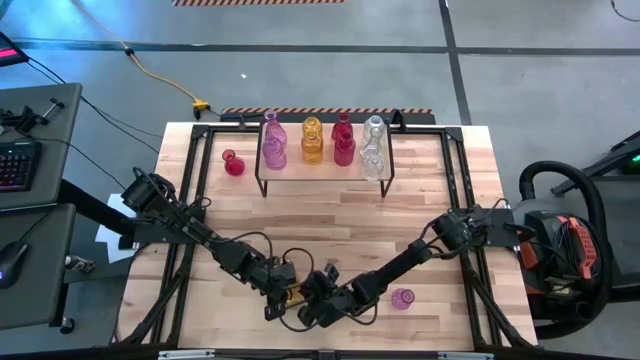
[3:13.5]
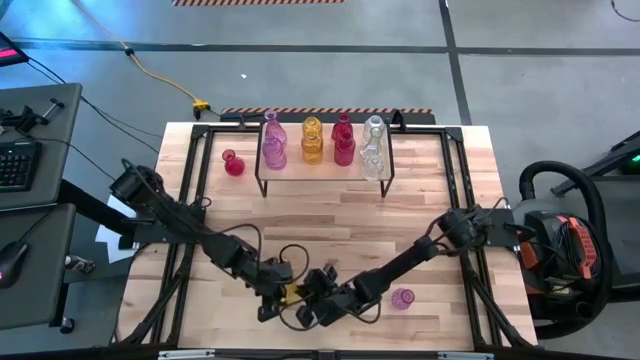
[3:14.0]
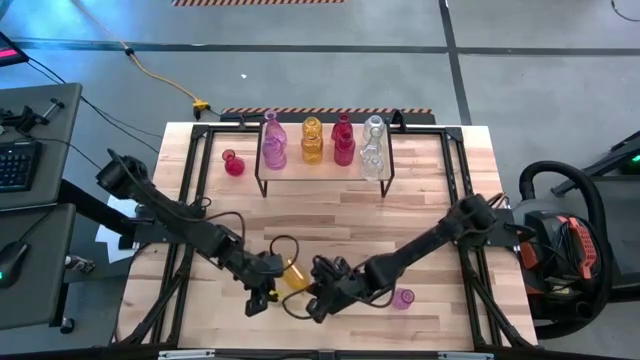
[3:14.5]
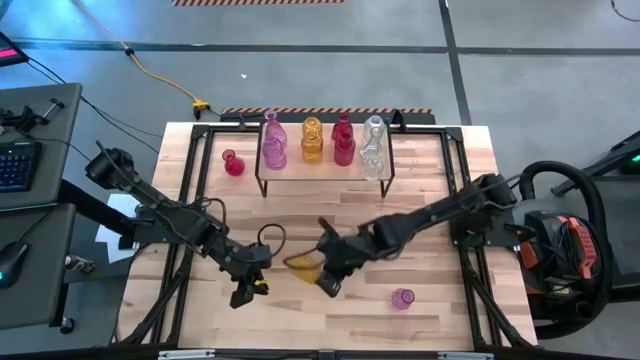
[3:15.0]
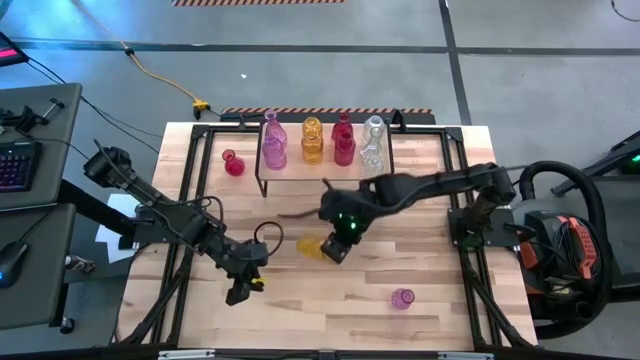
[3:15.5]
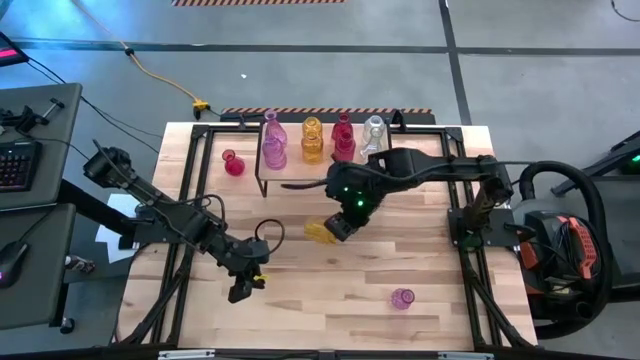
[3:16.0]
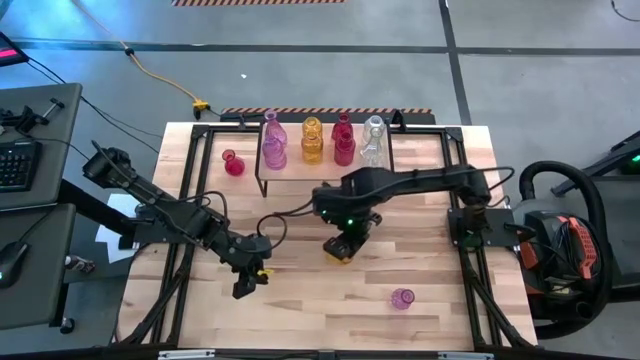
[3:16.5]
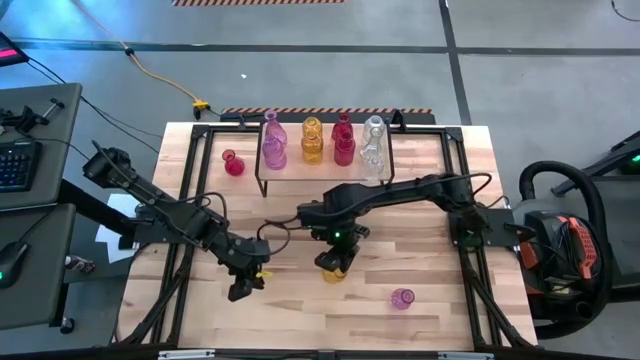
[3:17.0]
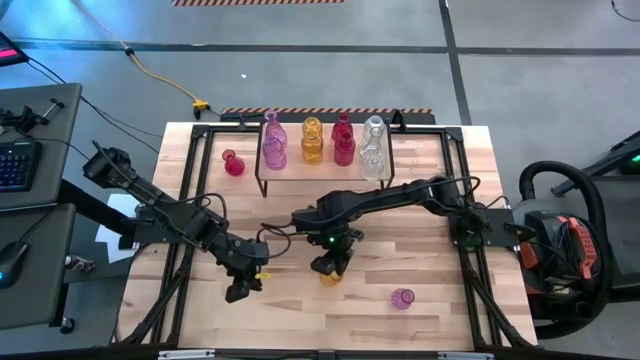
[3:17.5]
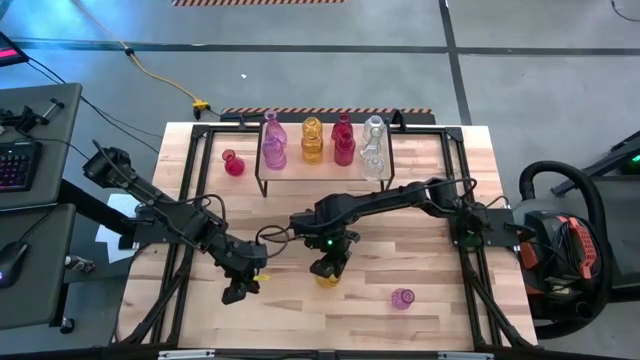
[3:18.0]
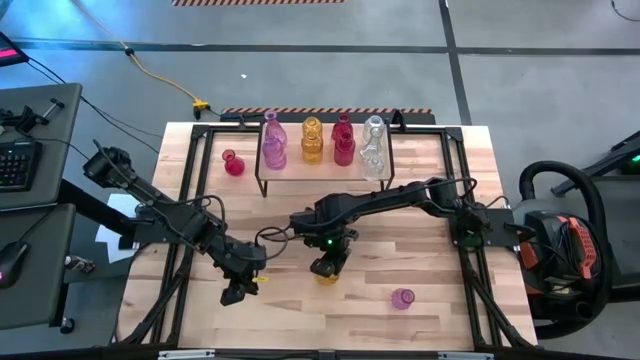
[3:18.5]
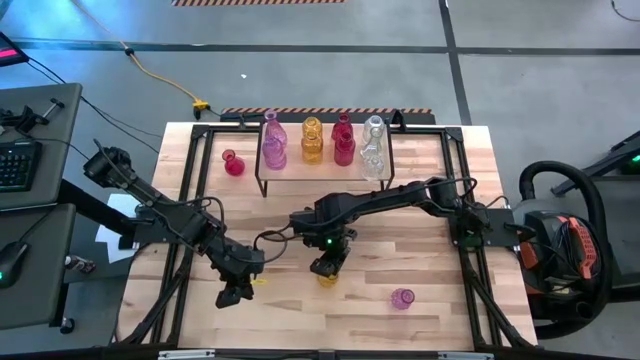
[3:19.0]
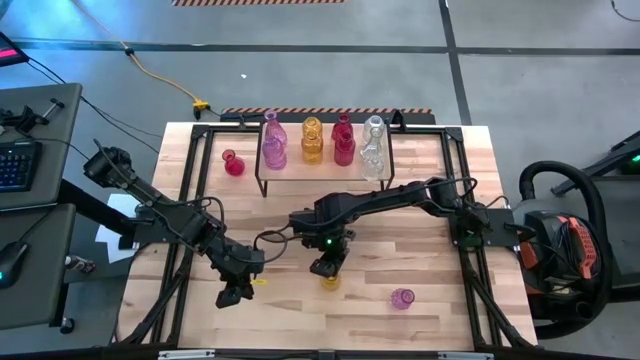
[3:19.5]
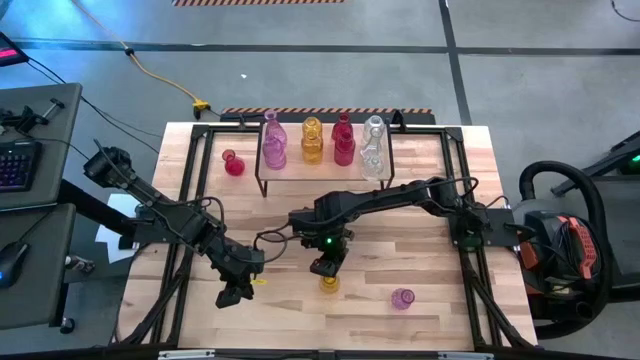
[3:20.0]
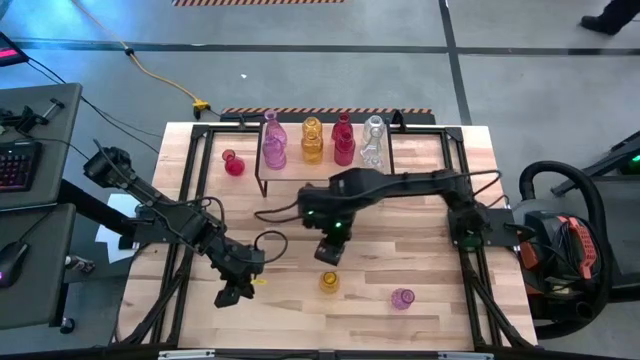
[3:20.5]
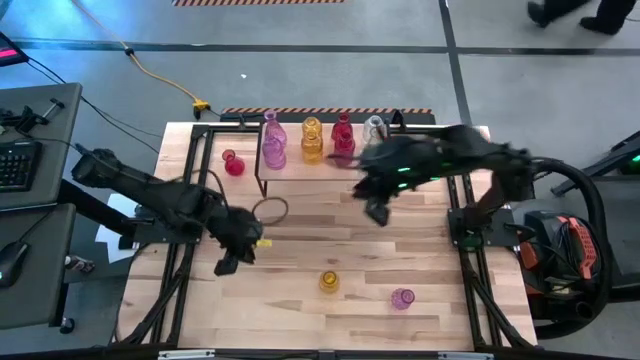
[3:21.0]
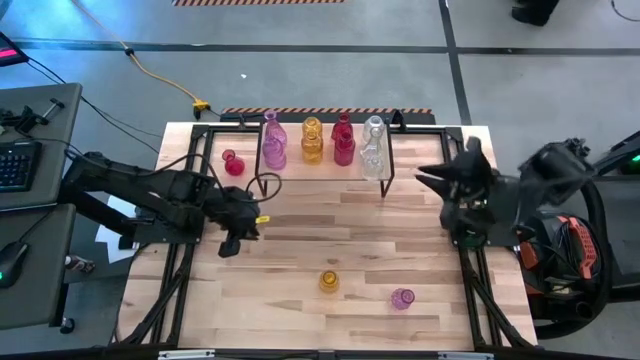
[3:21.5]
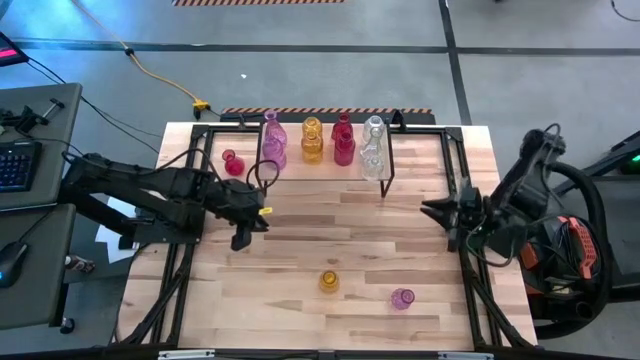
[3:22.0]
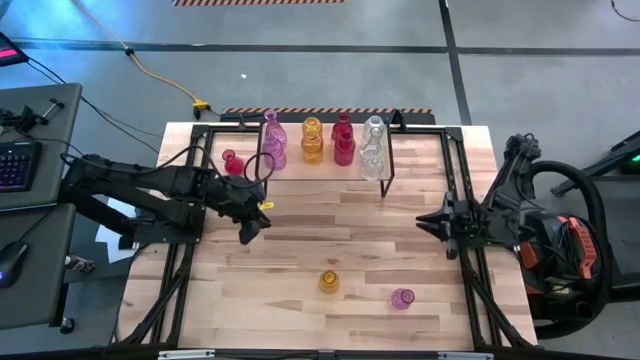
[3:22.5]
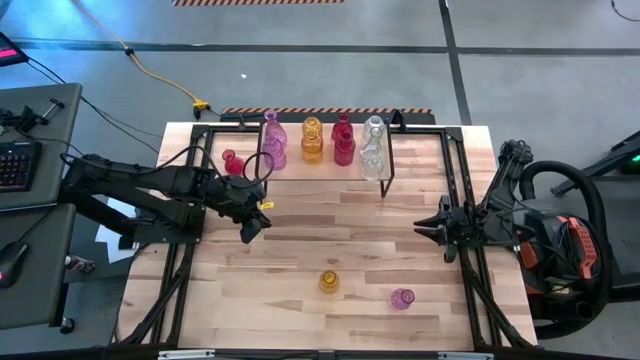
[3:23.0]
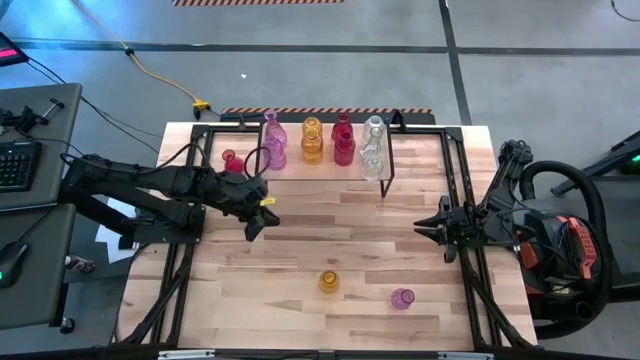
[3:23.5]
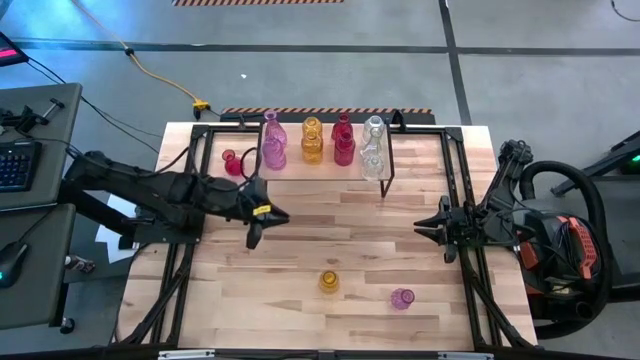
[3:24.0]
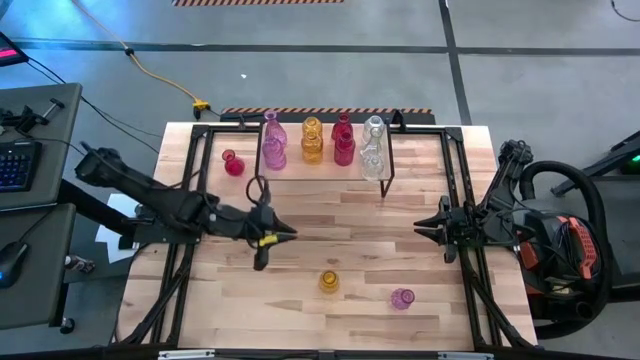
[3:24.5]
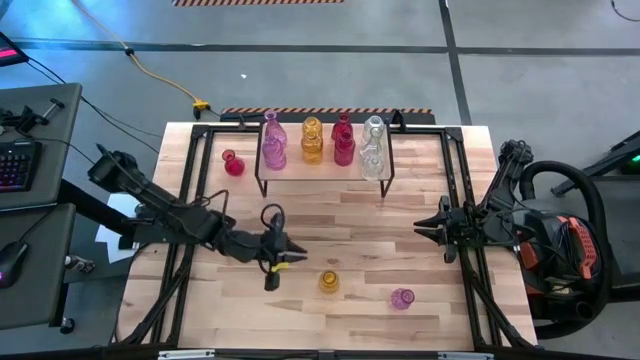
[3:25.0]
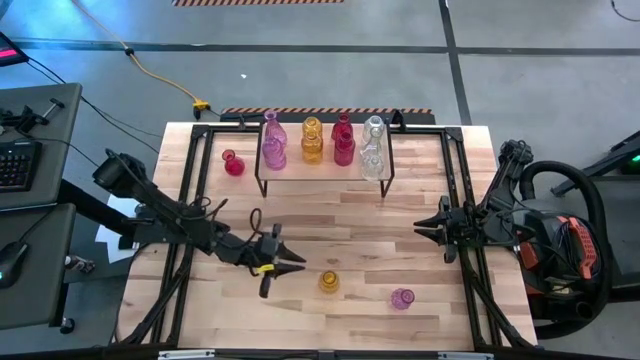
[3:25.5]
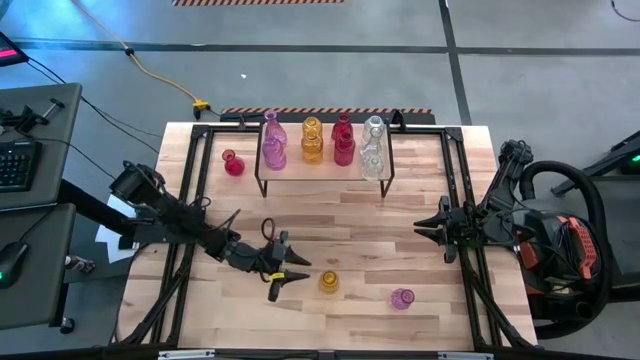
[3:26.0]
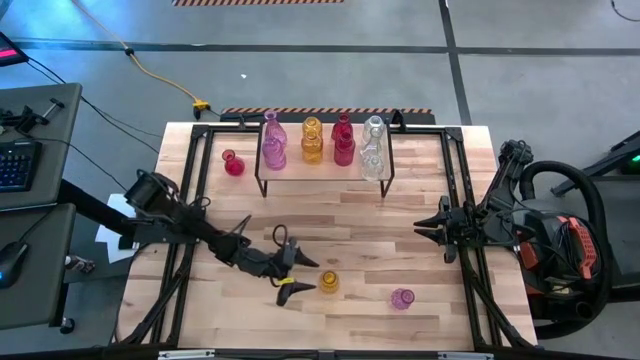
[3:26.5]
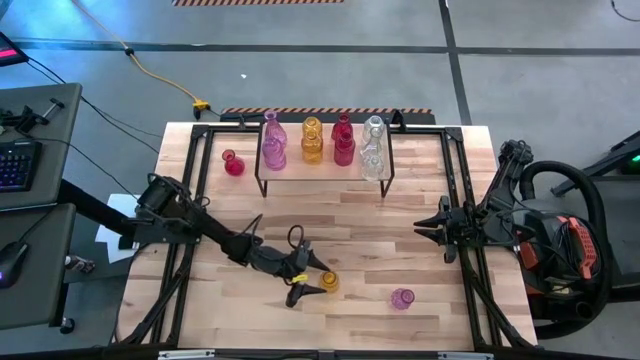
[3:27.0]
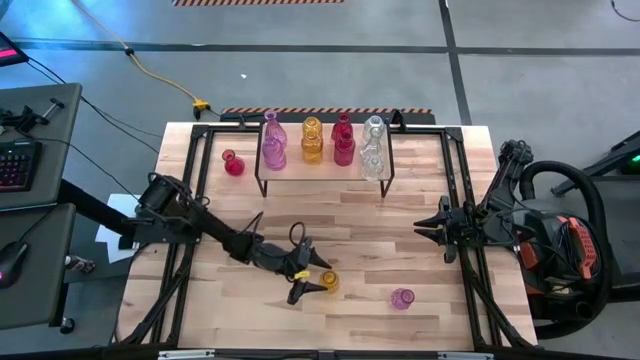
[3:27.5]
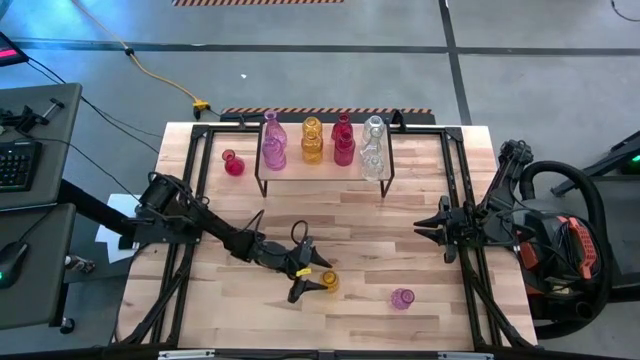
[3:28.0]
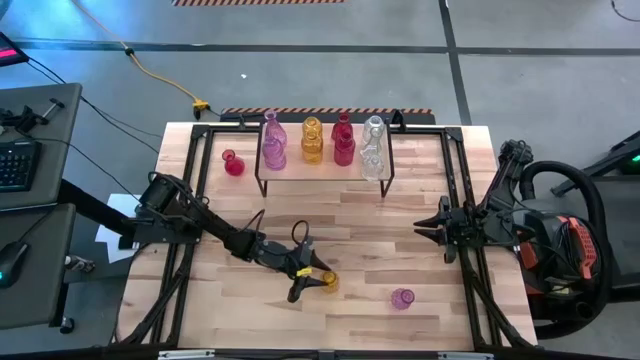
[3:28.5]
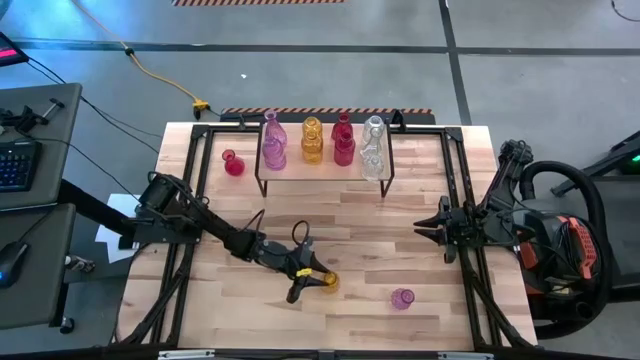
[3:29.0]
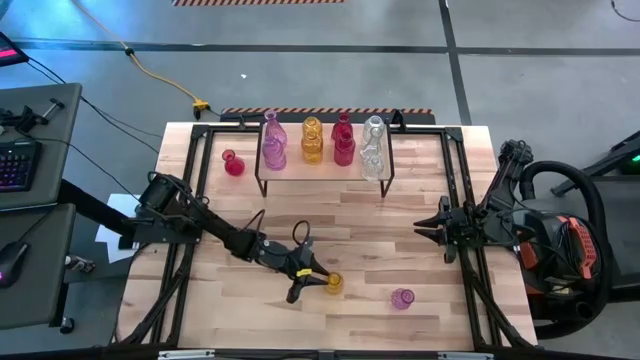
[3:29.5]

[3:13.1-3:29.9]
Task: sort vases onto shelf
Put the yellow vase on the shelf aligned with the other yellow vases

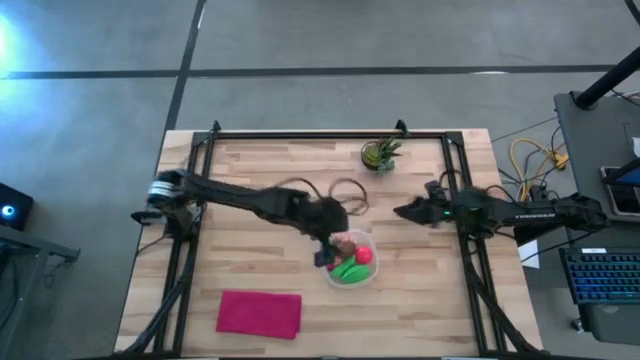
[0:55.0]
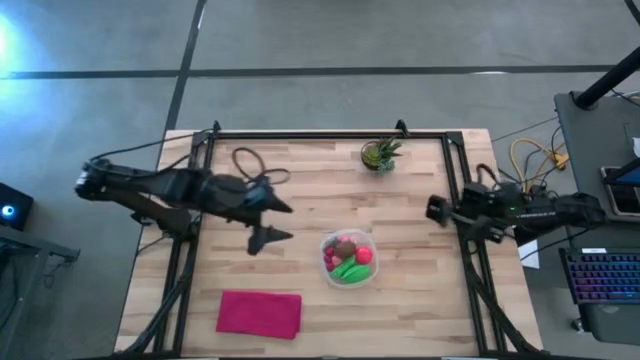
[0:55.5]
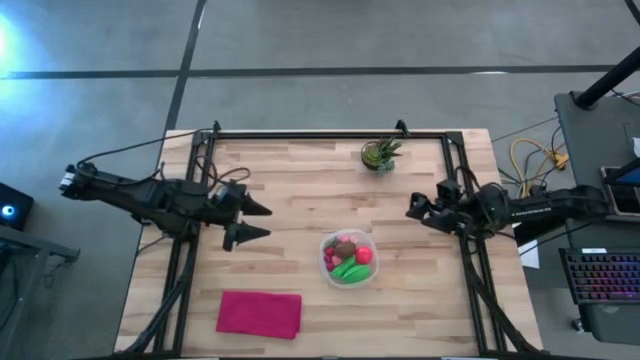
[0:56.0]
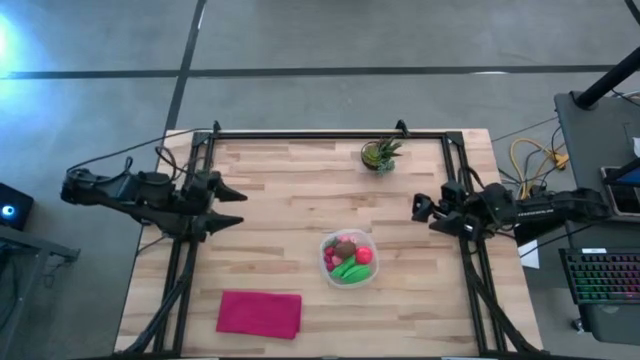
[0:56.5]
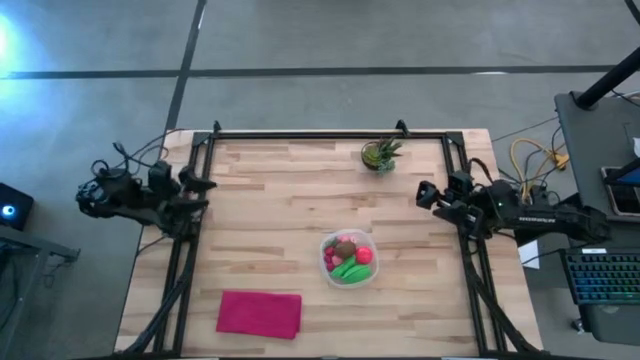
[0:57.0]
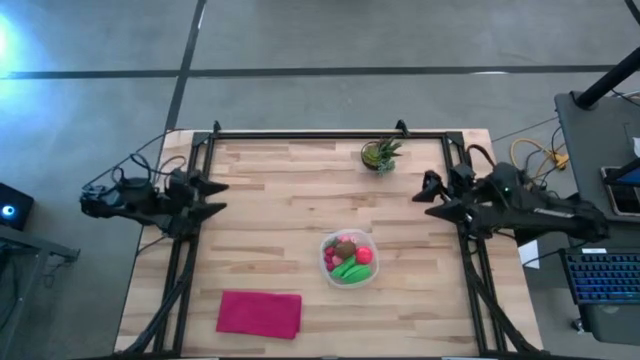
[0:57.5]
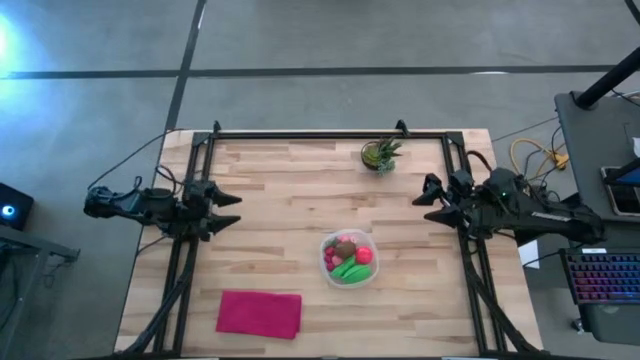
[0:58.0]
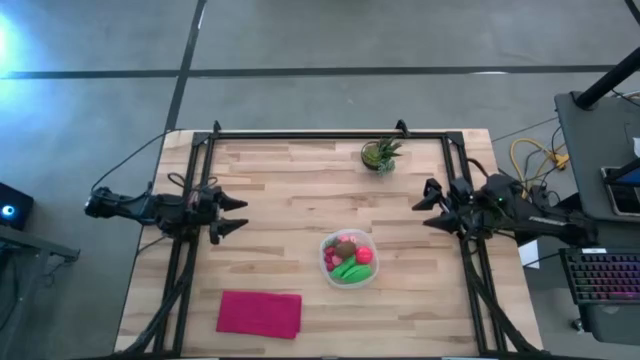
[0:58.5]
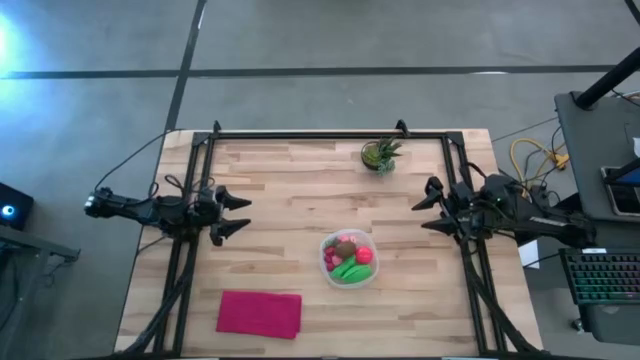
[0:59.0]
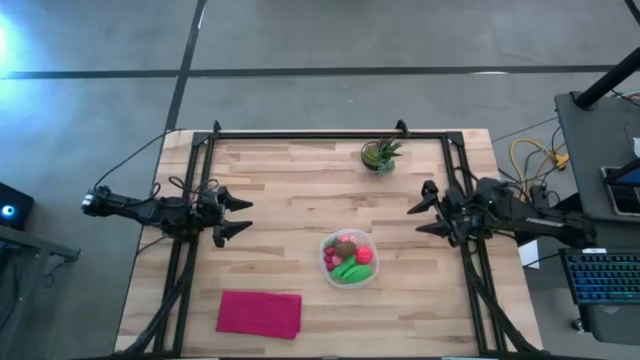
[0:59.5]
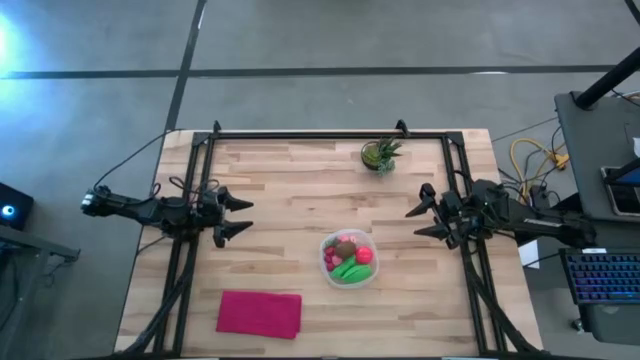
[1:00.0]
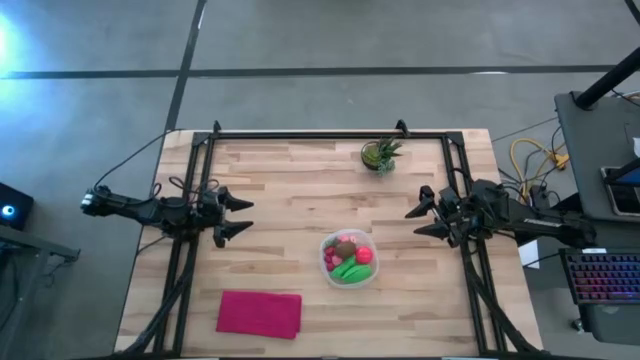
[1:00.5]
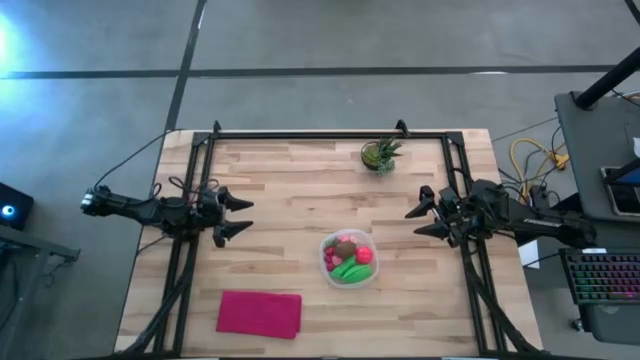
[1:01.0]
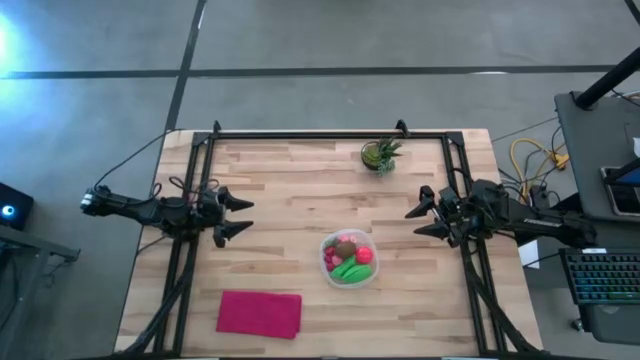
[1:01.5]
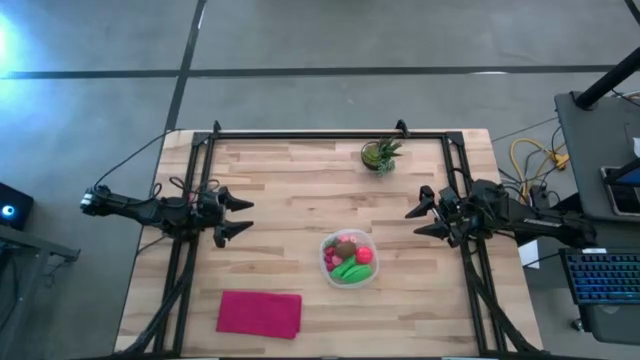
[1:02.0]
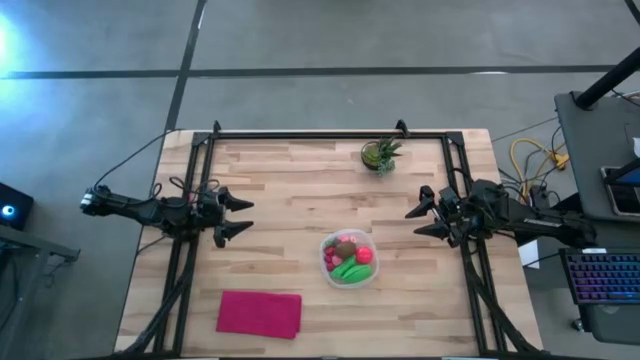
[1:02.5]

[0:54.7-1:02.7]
Task: Pick and placing Produce into tupperware
Return to Home Position
